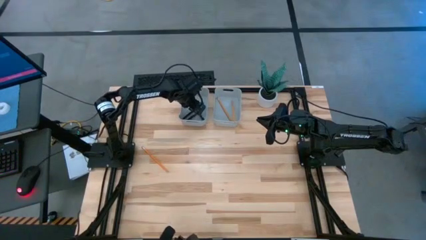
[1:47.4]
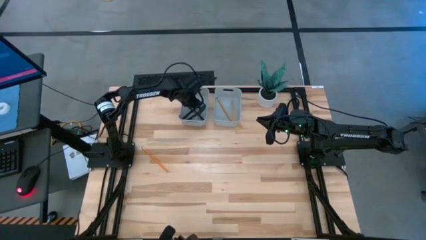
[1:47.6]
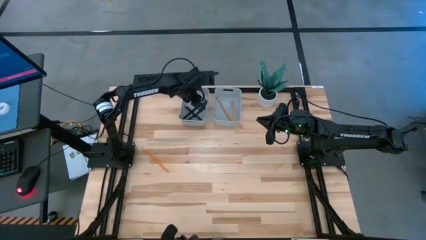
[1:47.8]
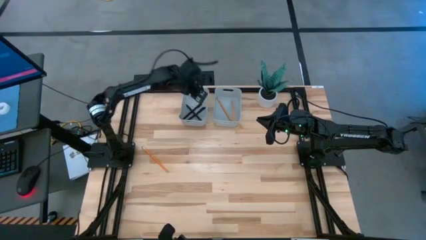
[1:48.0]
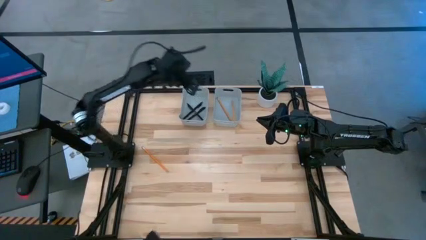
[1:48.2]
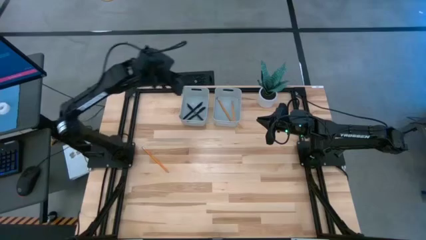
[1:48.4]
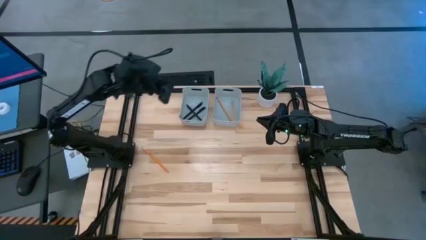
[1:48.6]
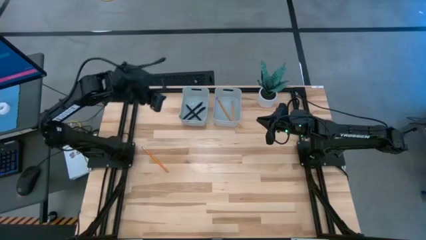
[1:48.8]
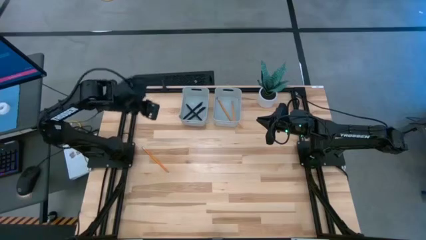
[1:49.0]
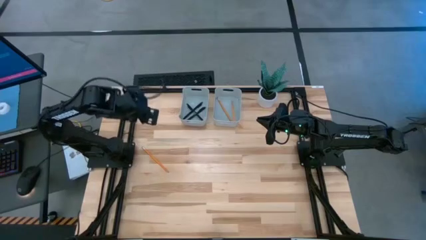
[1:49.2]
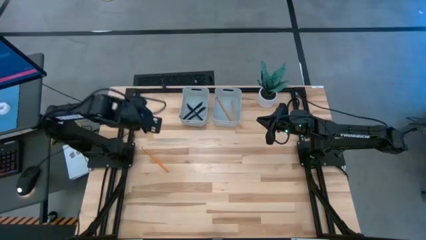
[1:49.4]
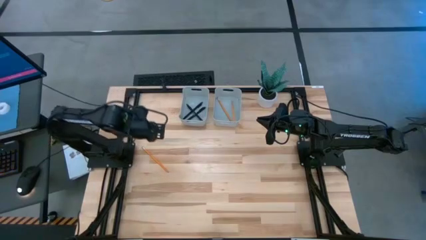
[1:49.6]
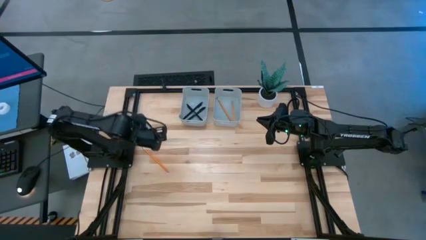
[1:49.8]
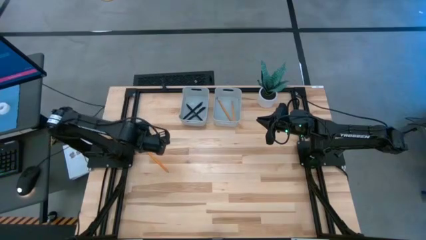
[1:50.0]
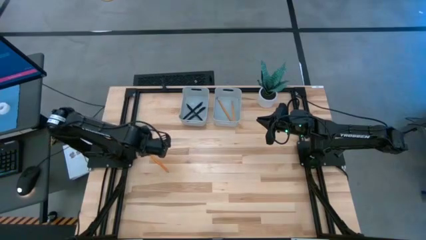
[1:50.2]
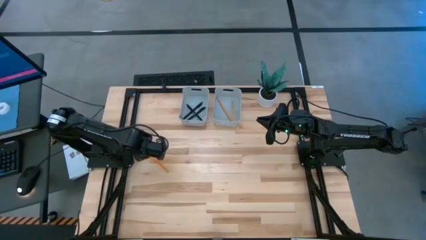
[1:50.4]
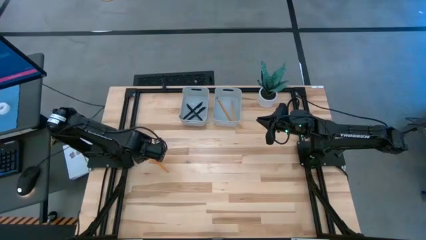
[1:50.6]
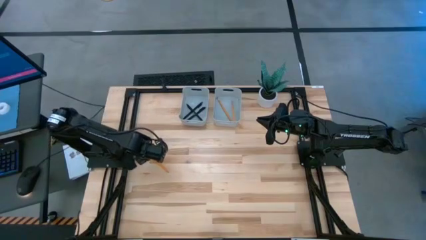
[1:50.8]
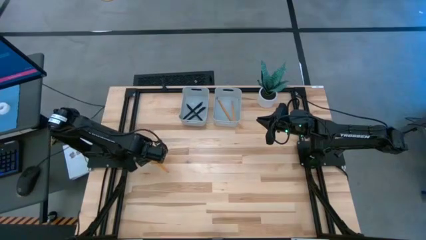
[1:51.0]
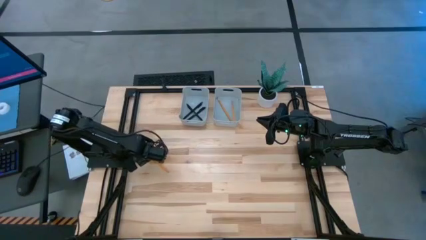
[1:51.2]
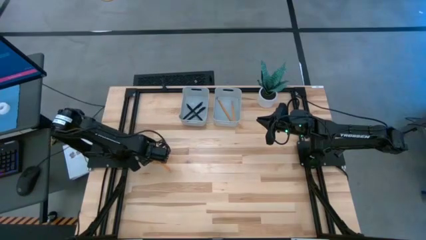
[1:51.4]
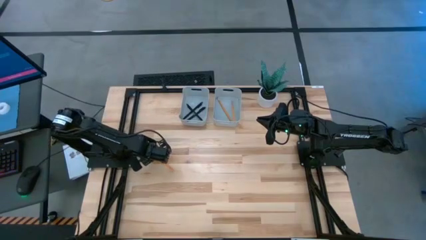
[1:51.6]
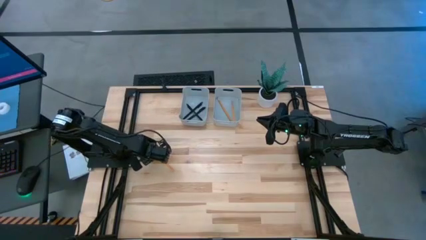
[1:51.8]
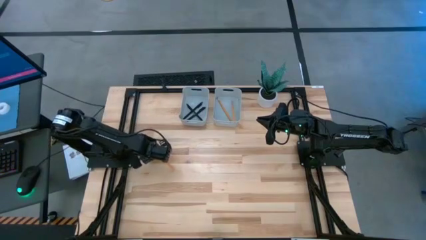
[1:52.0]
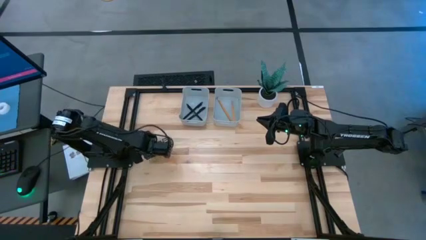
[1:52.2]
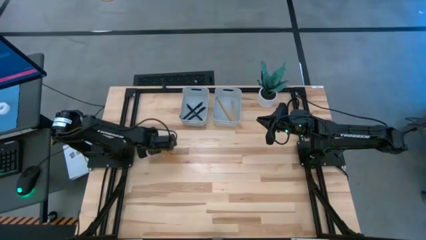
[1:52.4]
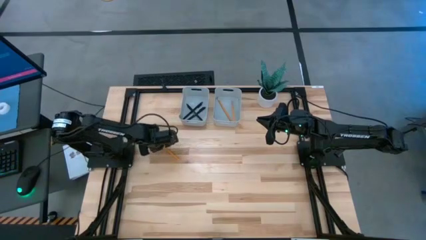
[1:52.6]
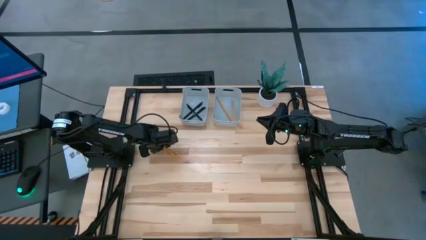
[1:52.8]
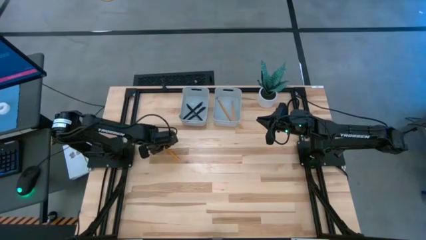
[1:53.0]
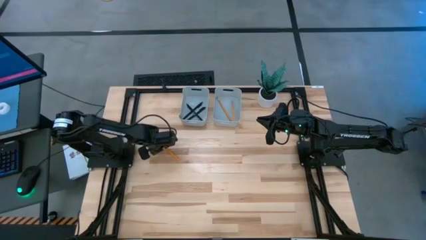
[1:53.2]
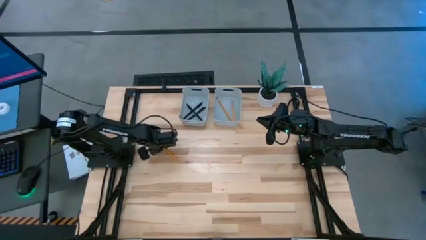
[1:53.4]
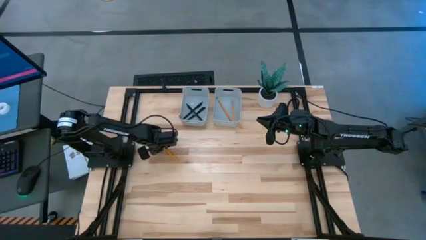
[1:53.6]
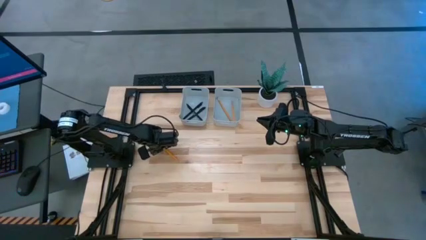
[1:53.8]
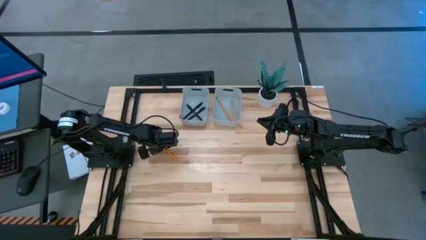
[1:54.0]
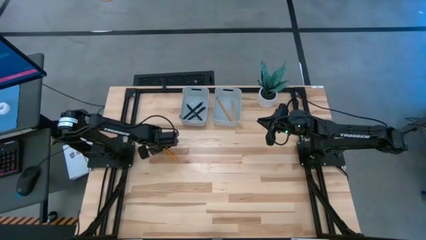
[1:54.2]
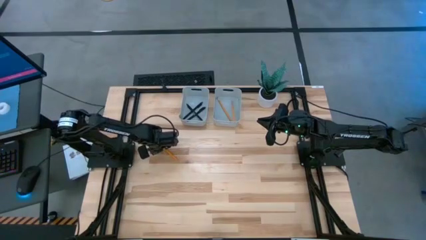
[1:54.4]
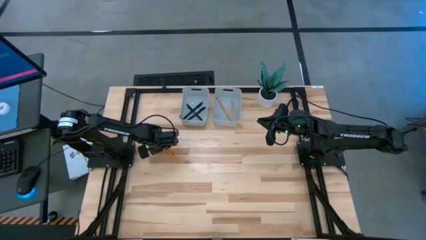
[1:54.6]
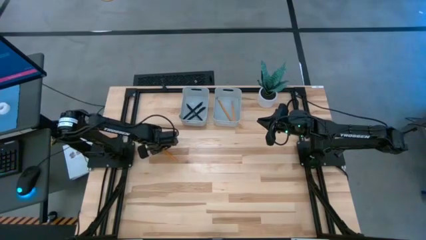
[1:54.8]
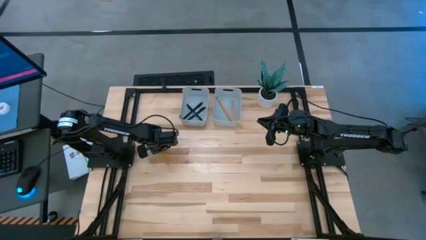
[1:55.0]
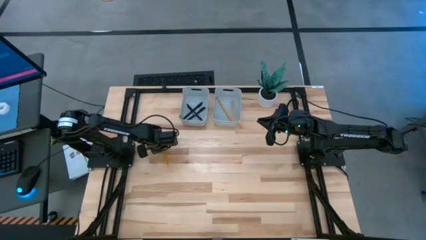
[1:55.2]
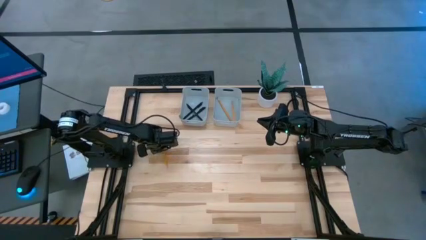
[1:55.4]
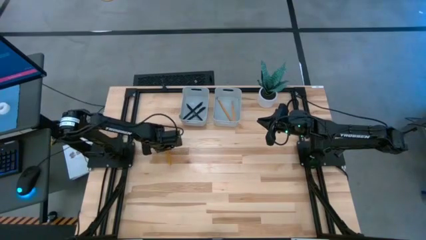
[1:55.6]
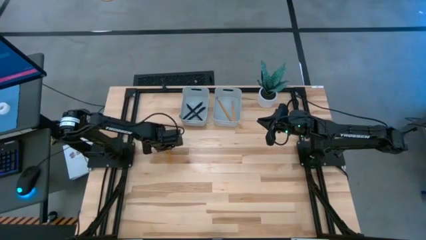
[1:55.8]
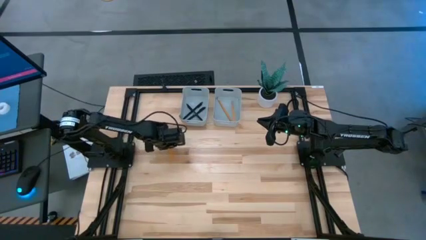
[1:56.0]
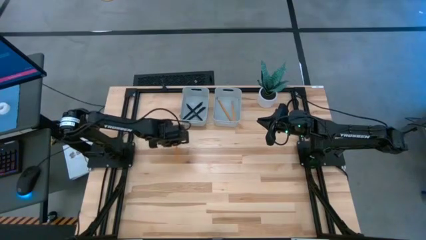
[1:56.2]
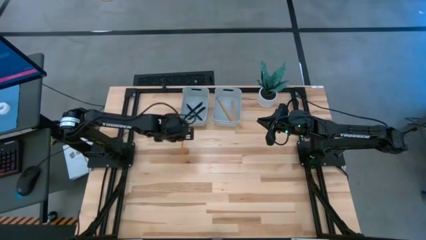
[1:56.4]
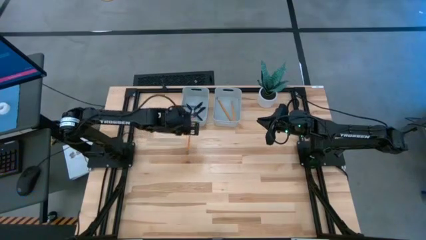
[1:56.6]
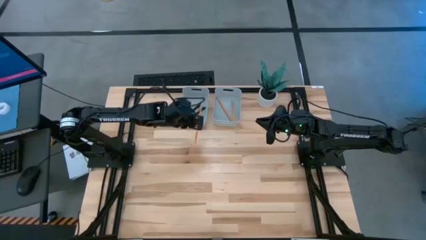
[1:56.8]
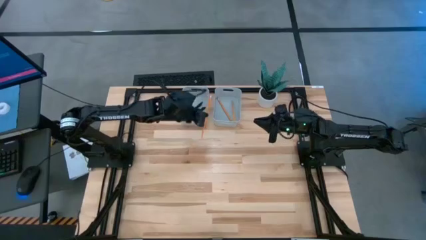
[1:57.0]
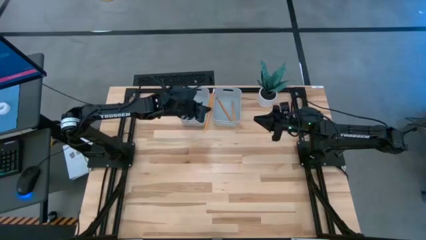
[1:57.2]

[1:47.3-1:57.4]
Task: Sort pens & pencils
Put the orange pencil into the right gray bin

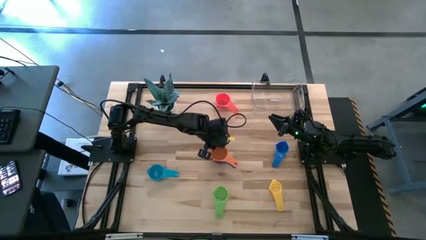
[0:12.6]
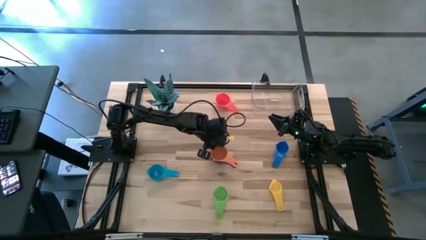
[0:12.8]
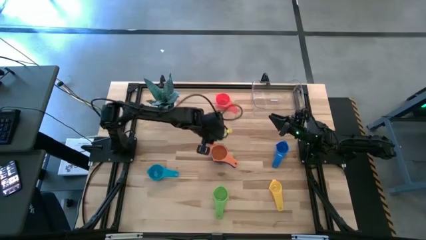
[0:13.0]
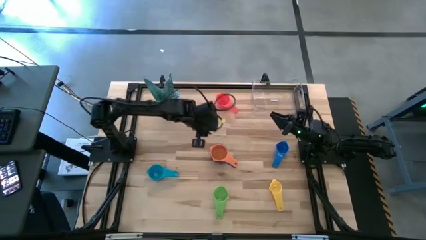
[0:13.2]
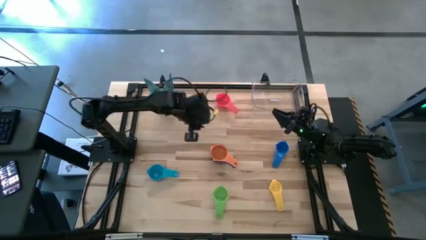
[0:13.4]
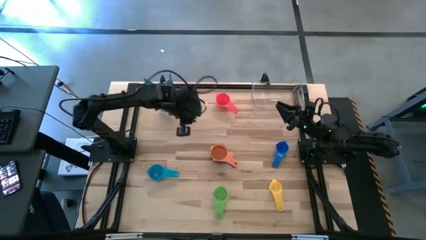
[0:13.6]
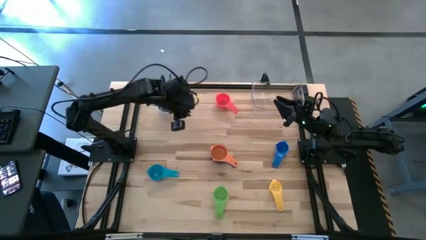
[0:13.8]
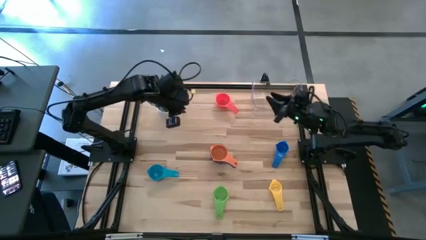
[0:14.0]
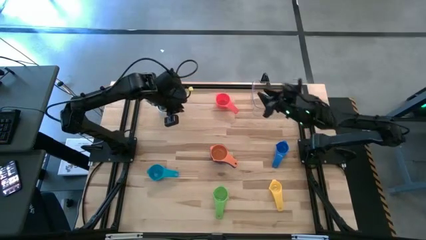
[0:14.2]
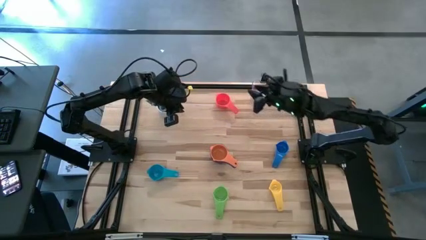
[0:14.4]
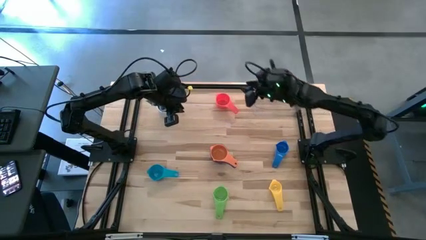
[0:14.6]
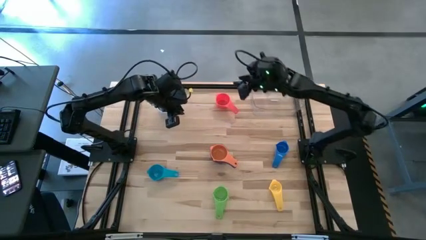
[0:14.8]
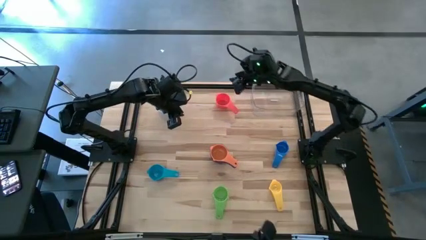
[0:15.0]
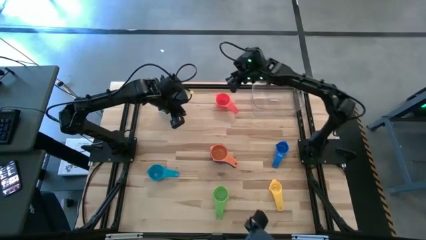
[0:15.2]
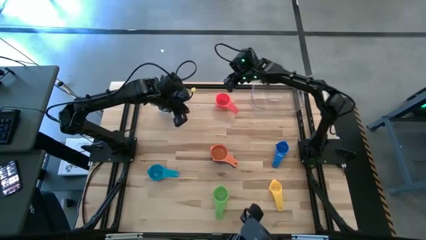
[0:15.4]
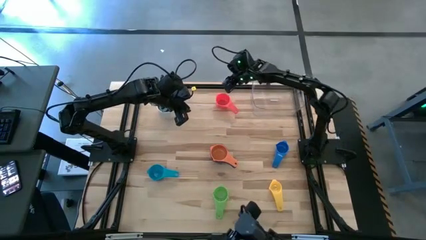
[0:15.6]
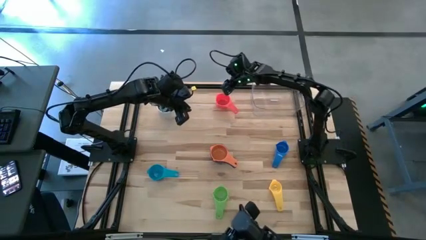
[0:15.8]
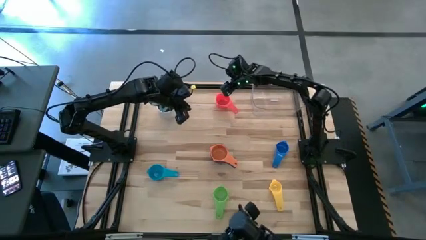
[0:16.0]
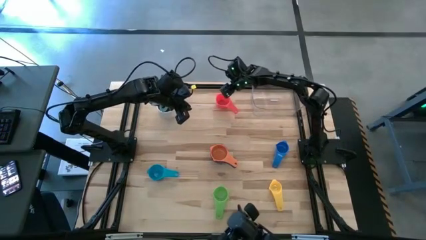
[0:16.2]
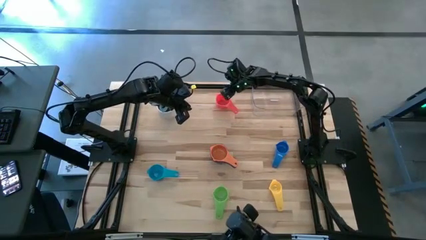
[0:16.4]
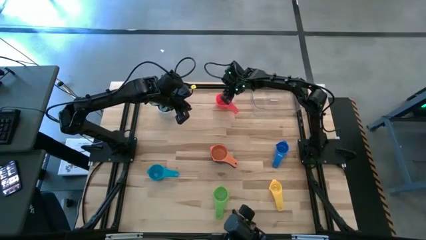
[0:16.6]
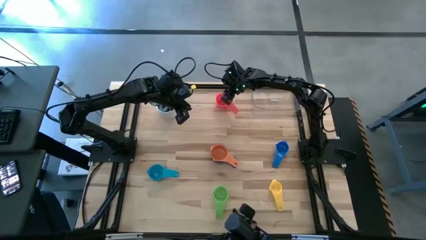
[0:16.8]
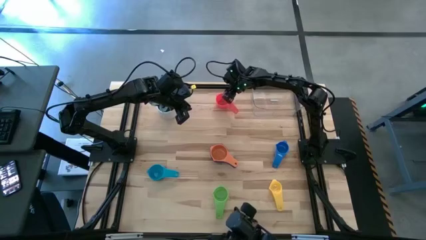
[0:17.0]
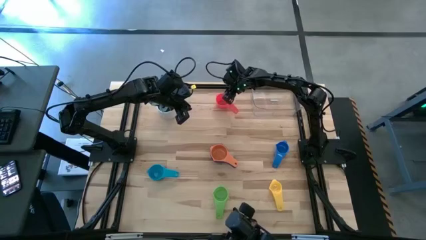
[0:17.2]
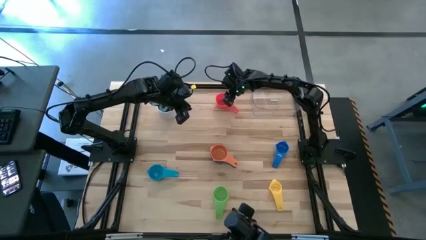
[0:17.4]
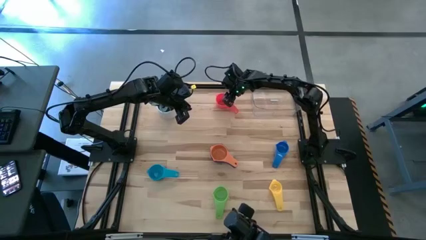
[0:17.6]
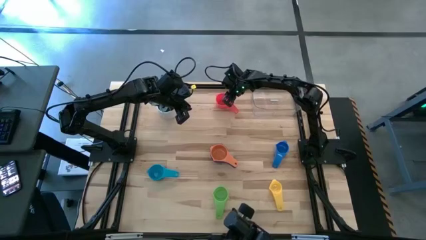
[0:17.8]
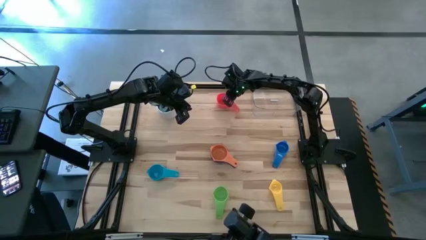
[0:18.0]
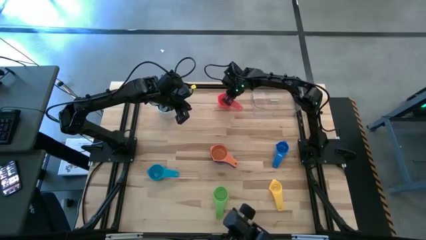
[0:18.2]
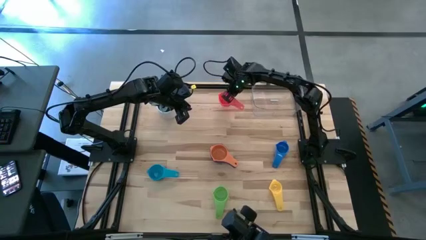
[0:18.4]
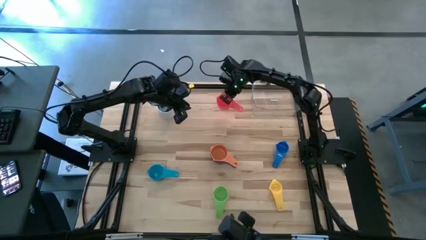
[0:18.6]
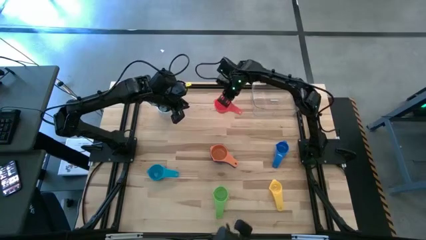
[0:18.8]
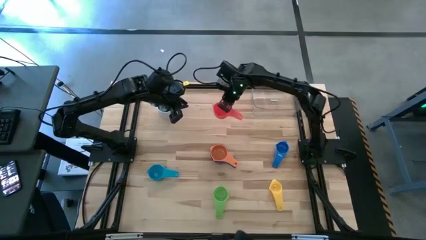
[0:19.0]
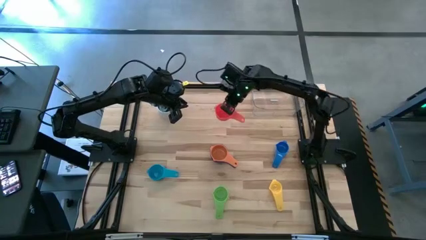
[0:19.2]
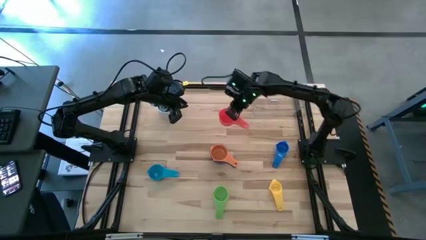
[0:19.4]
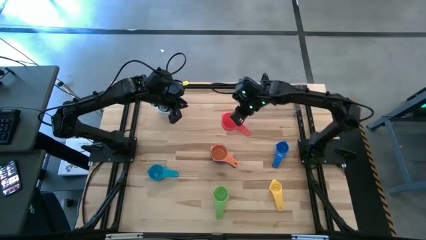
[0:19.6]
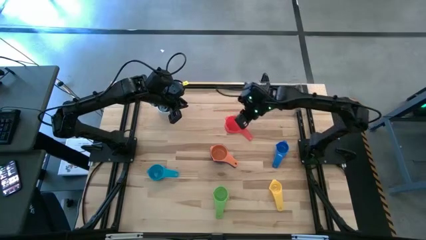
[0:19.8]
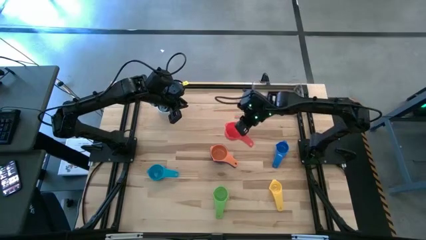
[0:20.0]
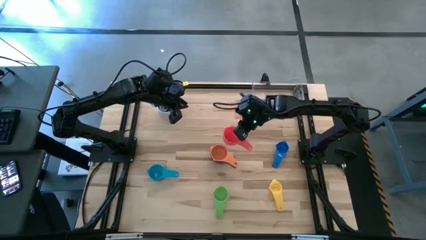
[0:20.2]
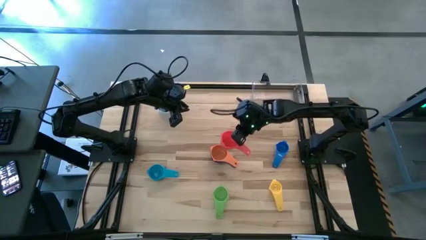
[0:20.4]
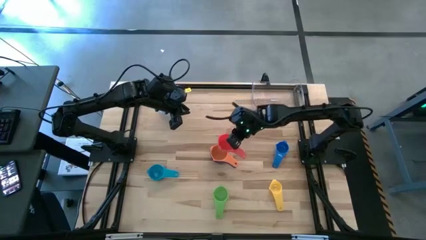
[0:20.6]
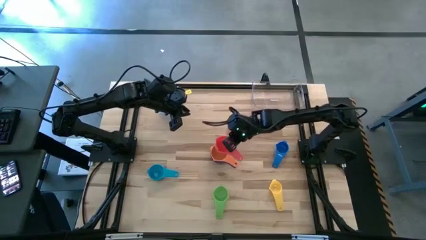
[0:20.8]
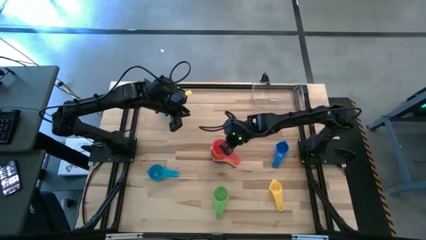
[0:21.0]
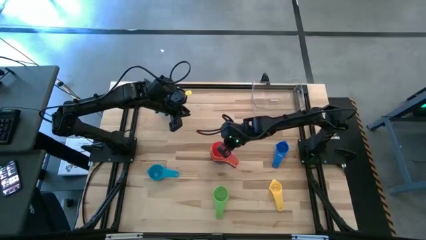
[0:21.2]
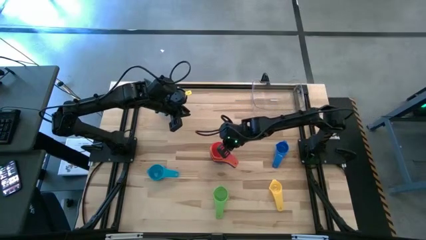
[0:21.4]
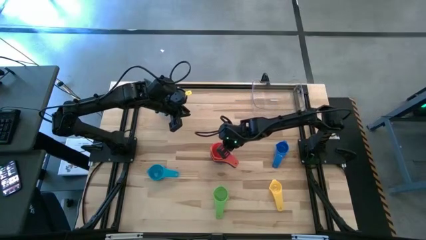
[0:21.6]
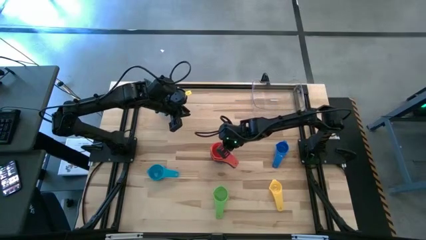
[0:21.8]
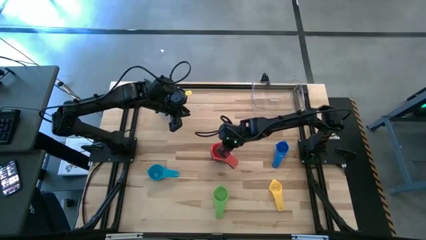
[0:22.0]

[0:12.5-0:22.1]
Task: Nest measuring cups in basket
Stack the red measuring cup on top of the orange measuring cup
